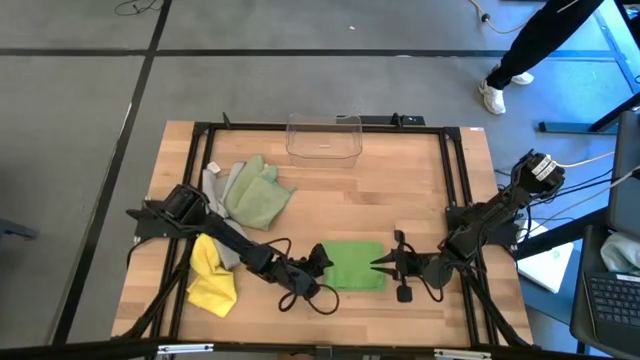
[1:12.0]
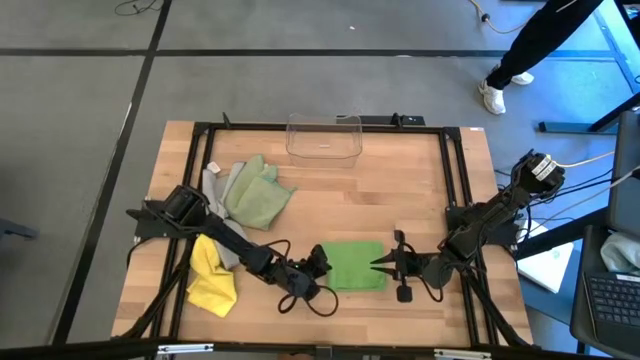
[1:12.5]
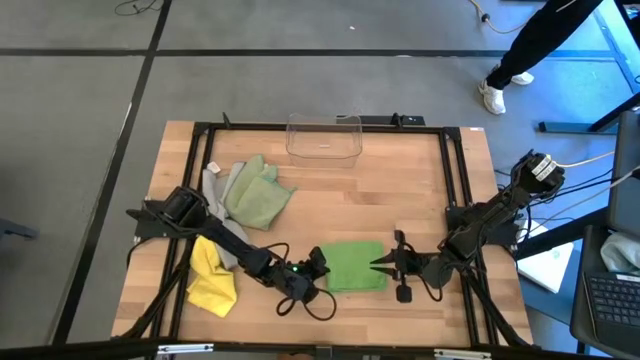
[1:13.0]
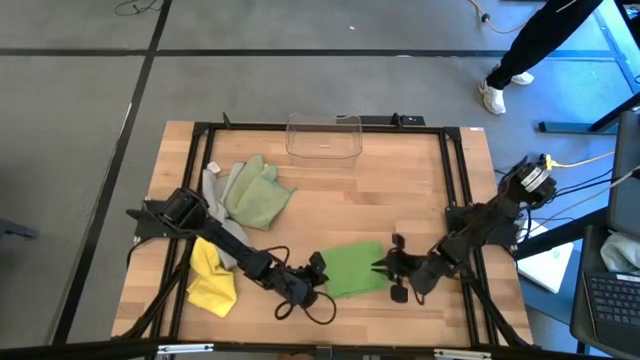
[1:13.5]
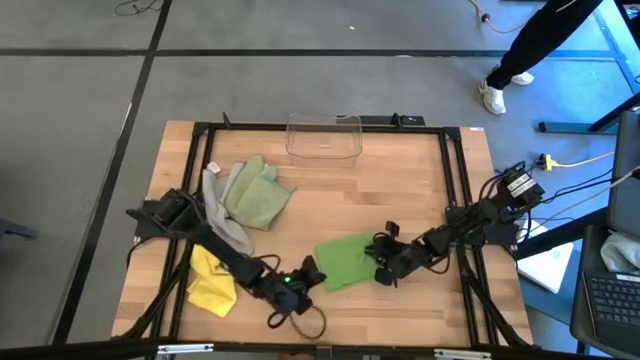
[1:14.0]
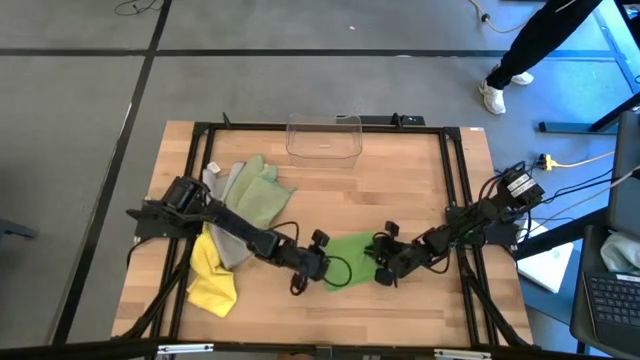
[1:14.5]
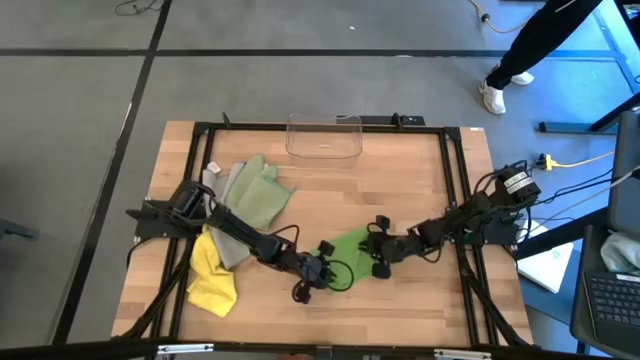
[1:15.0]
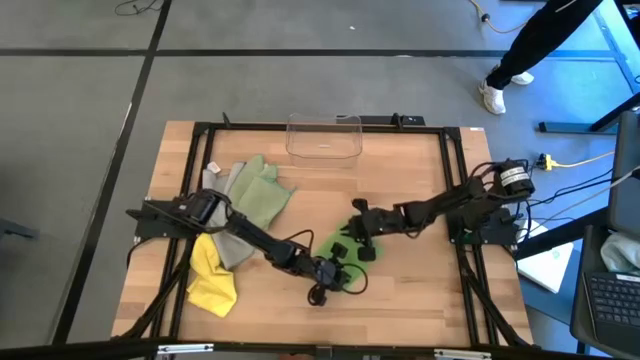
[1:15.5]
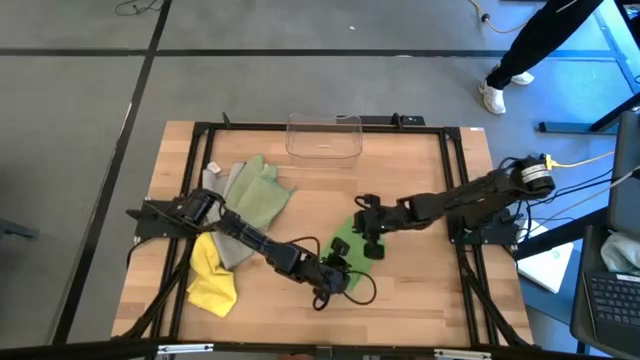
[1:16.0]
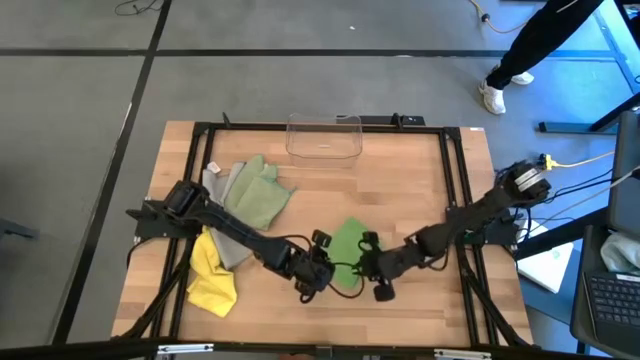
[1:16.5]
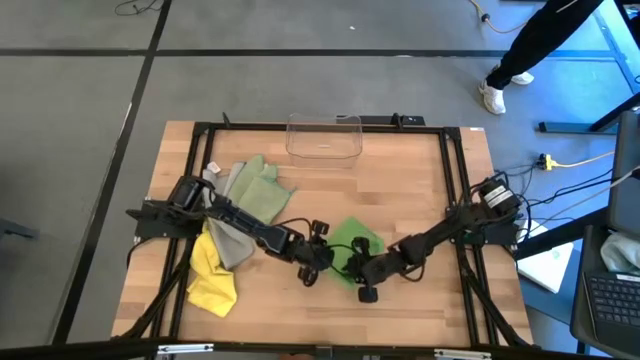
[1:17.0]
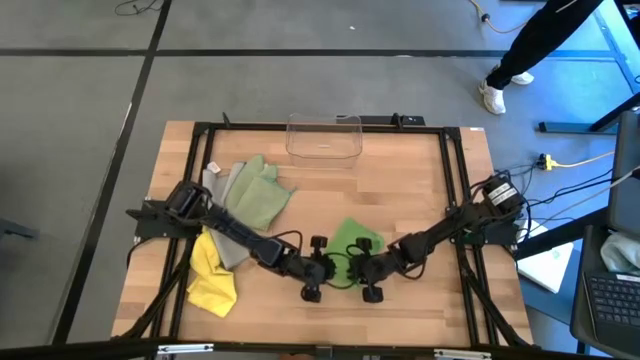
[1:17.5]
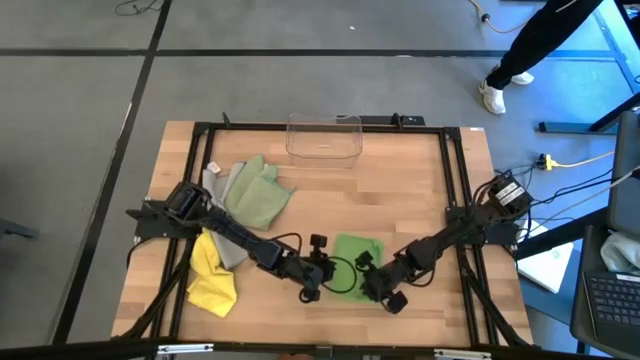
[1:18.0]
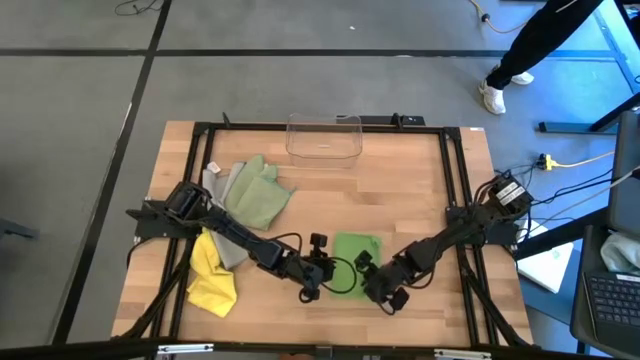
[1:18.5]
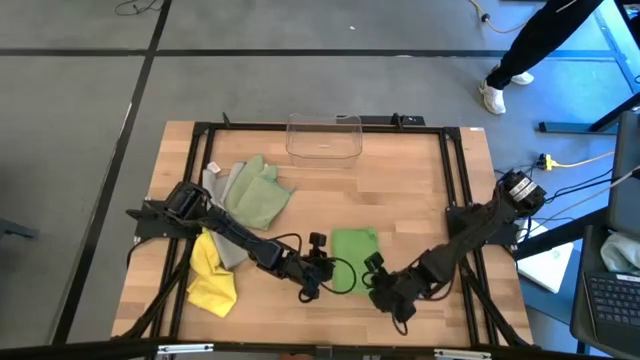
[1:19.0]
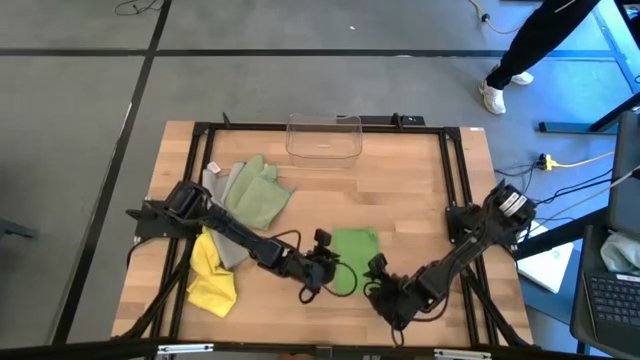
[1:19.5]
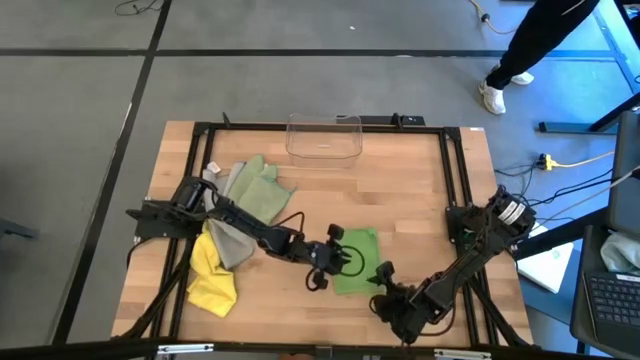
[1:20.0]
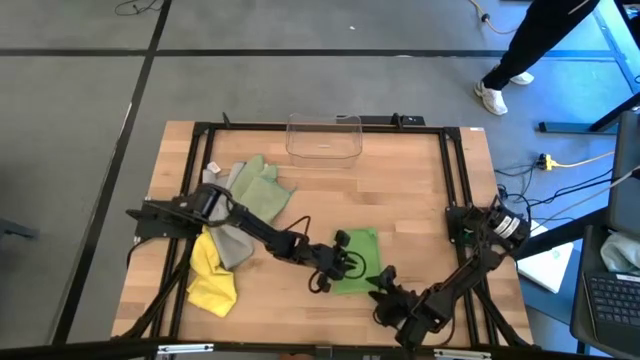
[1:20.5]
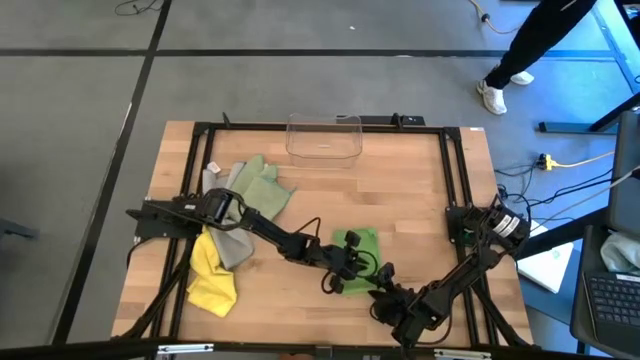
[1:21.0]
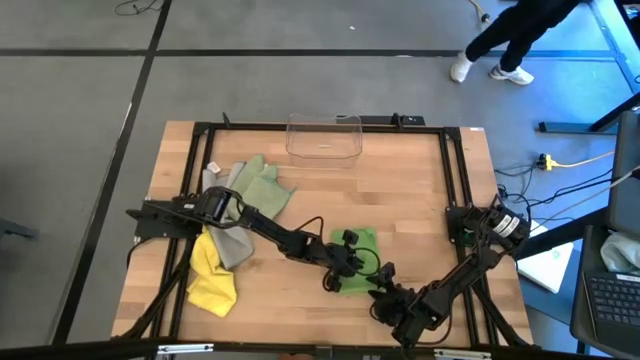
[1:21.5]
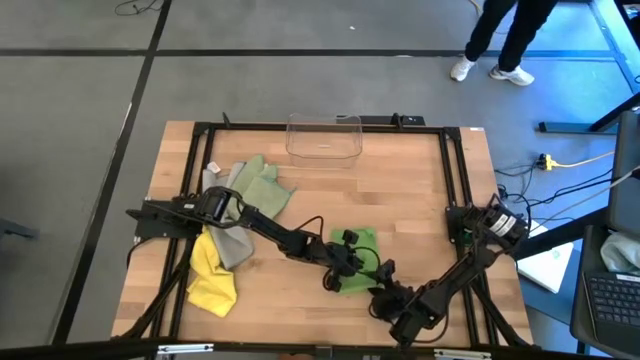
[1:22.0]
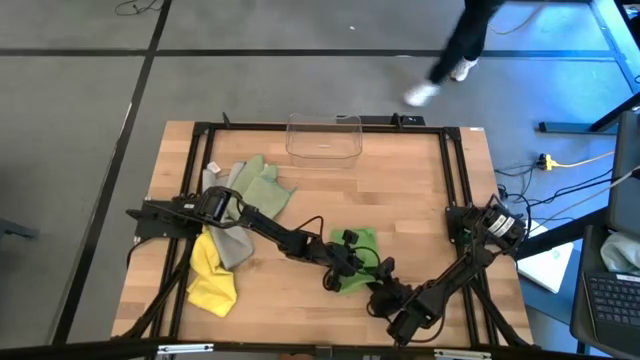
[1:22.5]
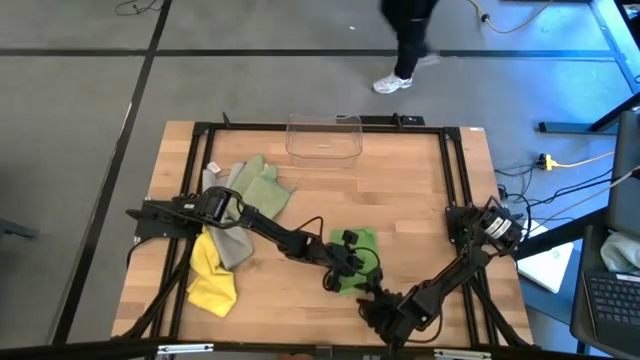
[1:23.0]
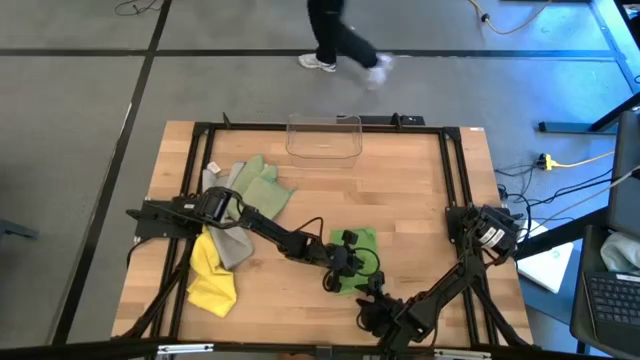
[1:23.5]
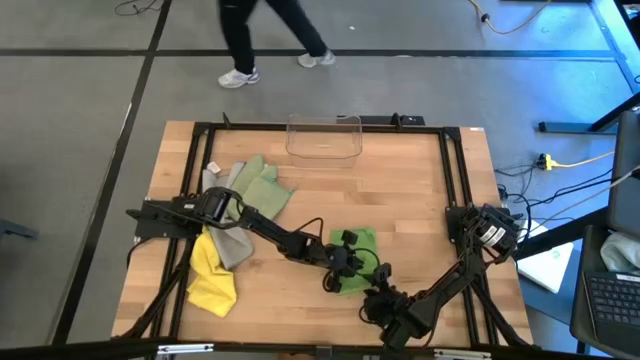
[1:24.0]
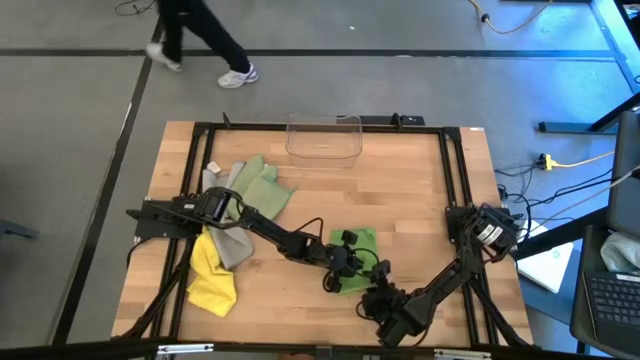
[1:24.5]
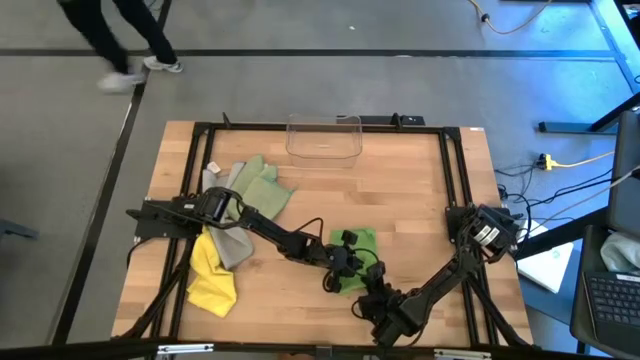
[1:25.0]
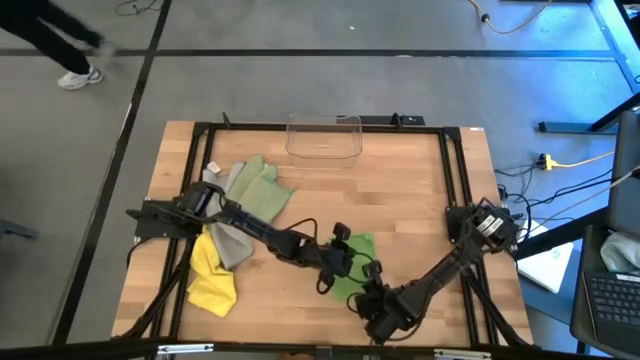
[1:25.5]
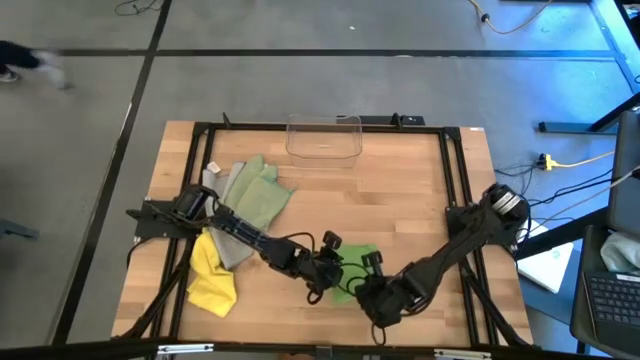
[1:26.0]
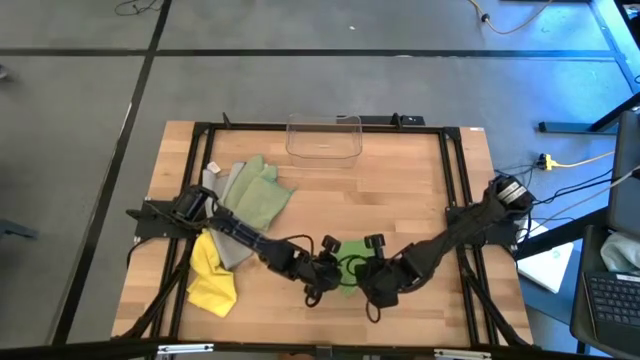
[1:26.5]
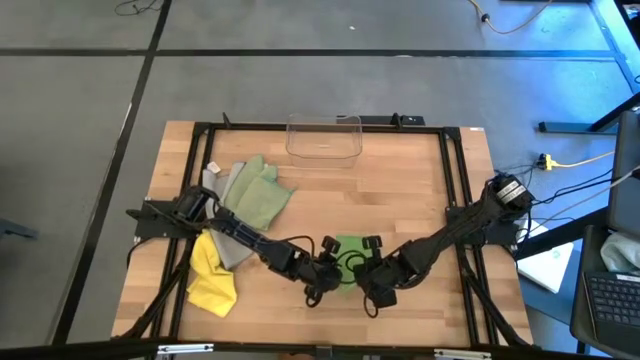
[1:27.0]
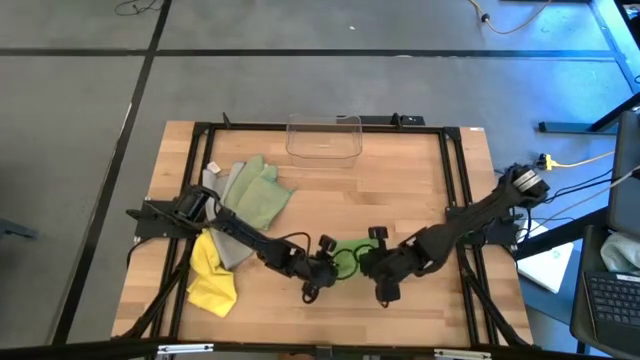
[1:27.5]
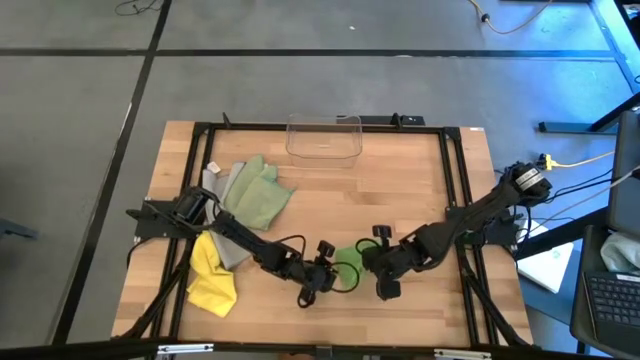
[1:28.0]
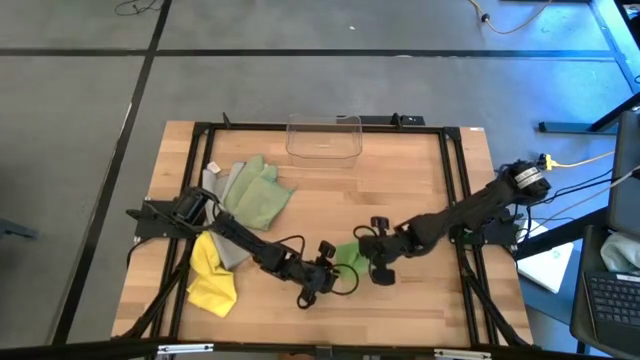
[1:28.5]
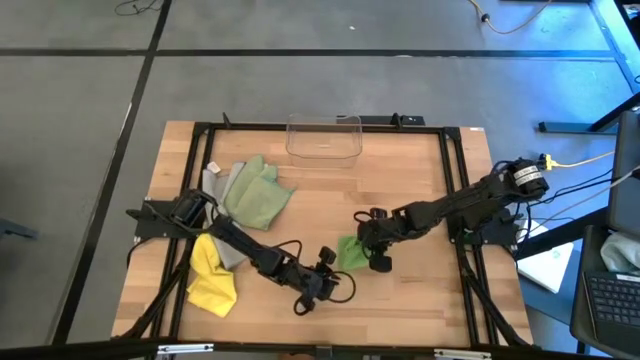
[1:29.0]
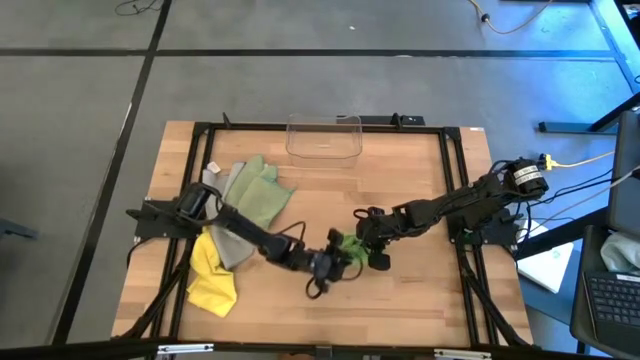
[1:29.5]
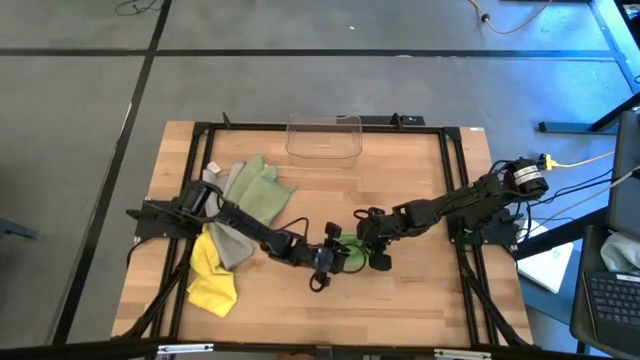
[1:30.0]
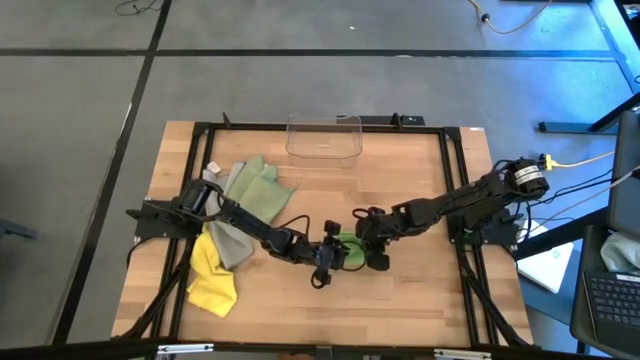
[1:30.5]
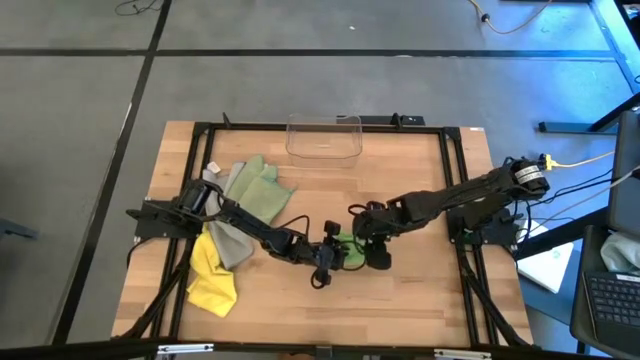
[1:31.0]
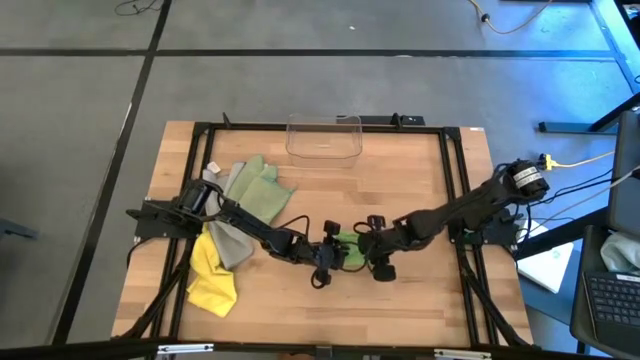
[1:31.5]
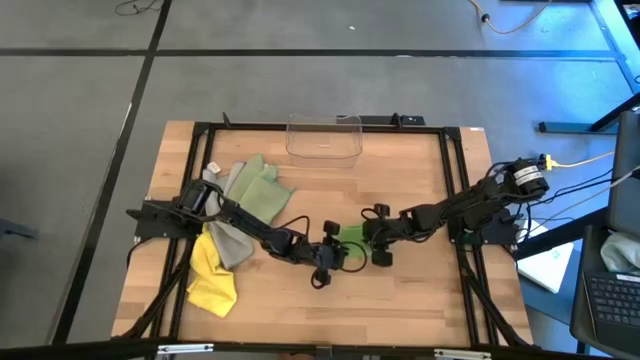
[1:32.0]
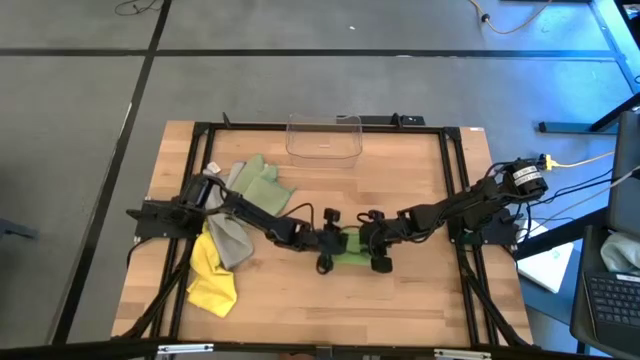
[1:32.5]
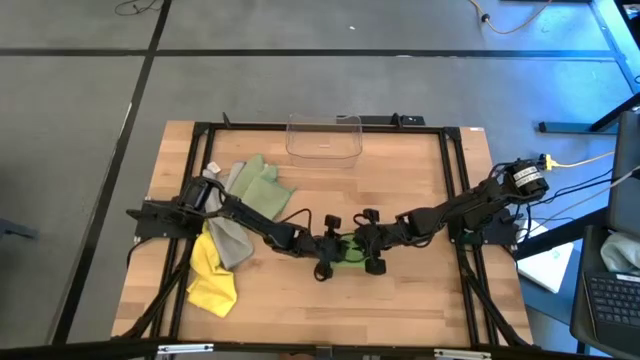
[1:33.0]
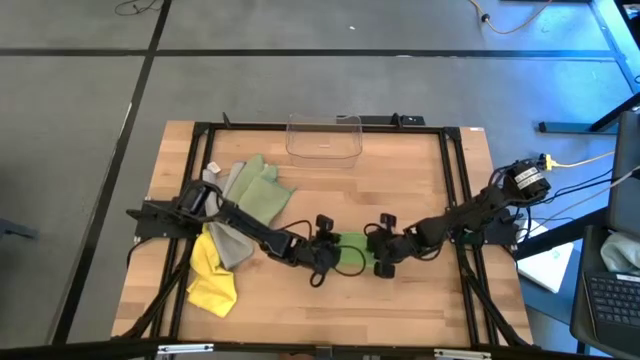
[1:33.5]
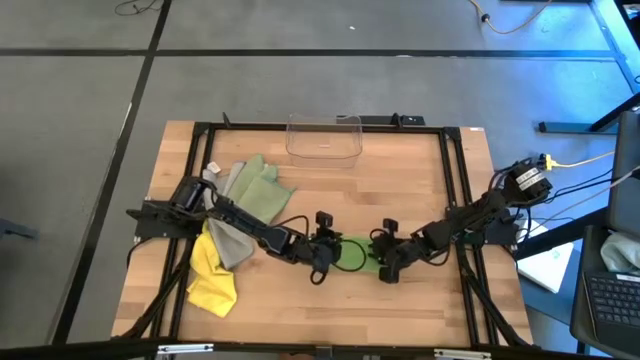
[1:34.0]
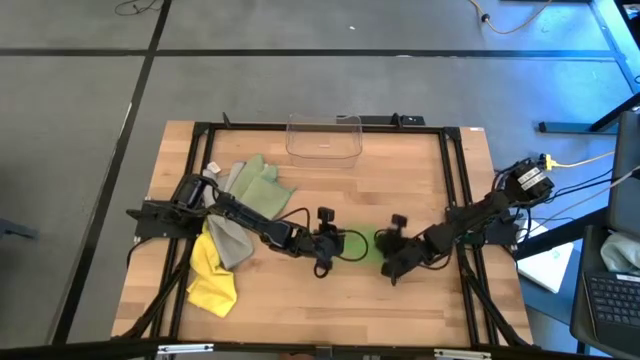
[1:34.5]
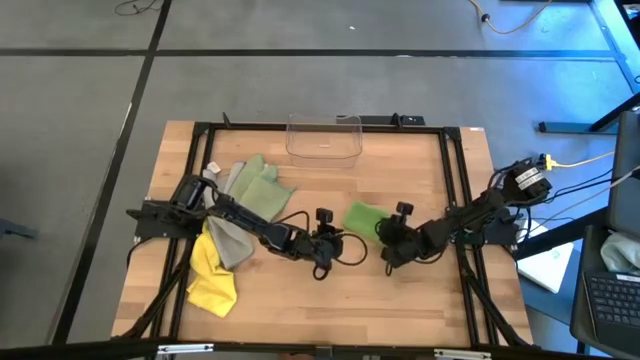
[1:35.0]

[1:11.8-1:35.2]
Task: Fold microfiber towels
Fold the green microfiber cloth
